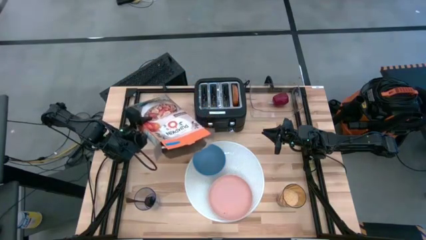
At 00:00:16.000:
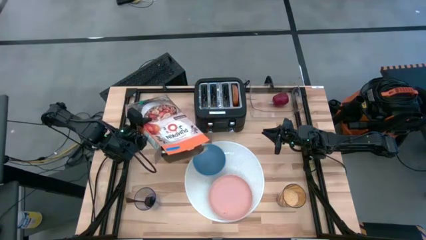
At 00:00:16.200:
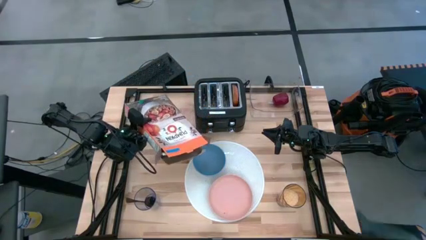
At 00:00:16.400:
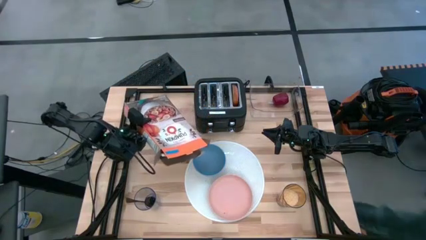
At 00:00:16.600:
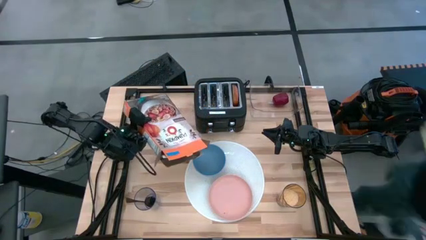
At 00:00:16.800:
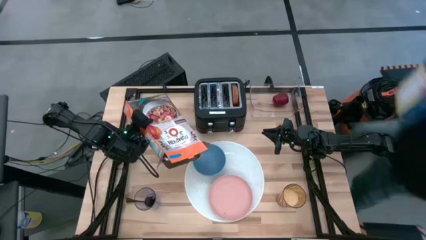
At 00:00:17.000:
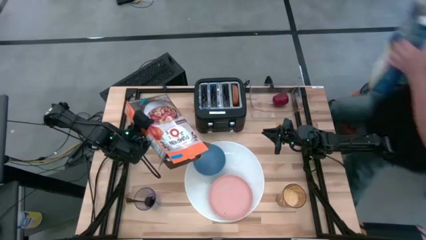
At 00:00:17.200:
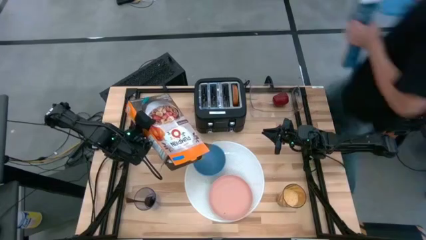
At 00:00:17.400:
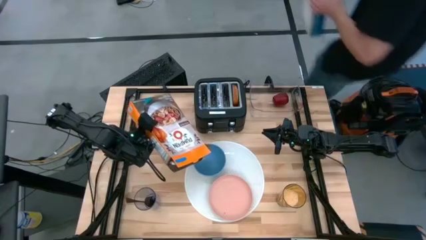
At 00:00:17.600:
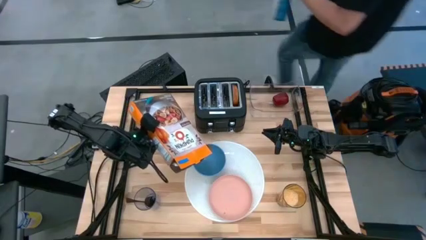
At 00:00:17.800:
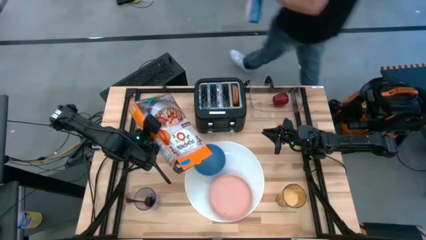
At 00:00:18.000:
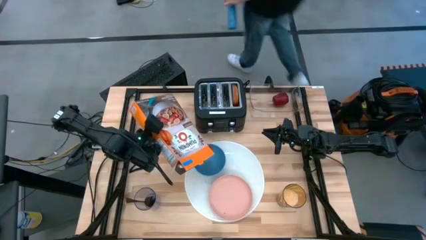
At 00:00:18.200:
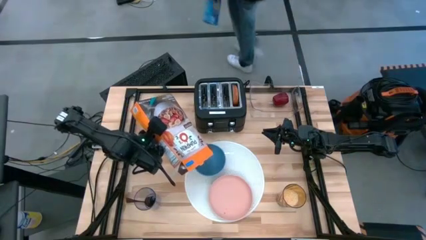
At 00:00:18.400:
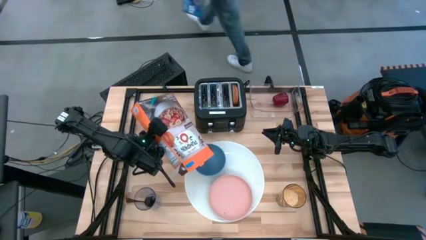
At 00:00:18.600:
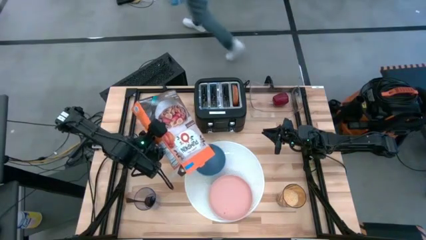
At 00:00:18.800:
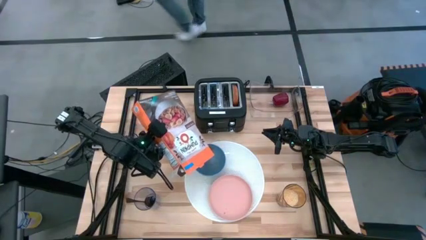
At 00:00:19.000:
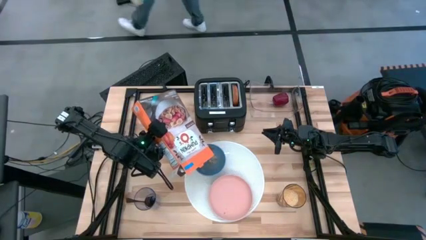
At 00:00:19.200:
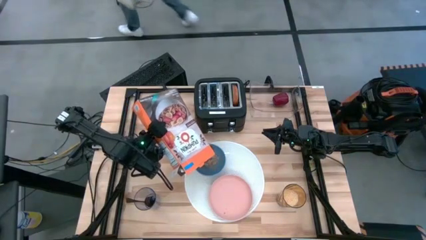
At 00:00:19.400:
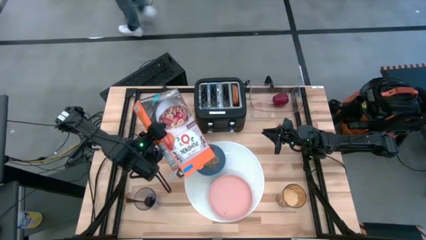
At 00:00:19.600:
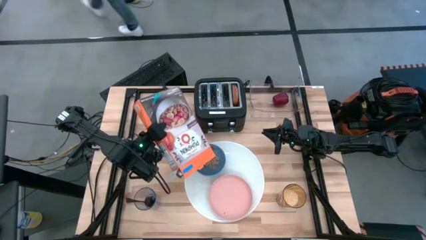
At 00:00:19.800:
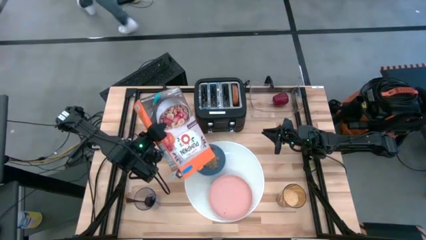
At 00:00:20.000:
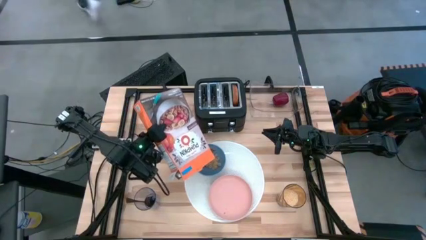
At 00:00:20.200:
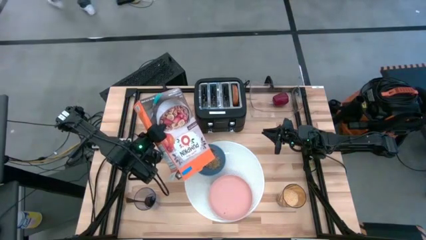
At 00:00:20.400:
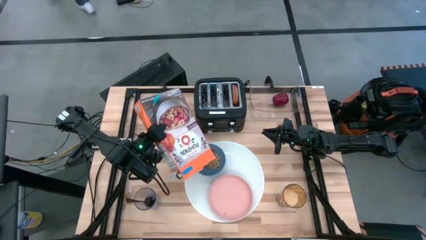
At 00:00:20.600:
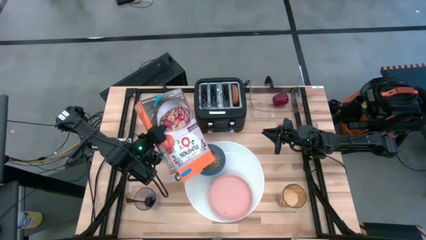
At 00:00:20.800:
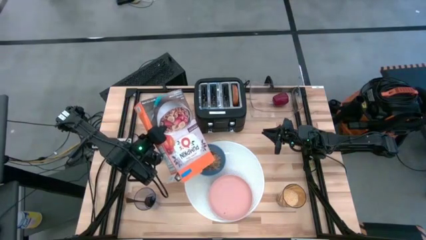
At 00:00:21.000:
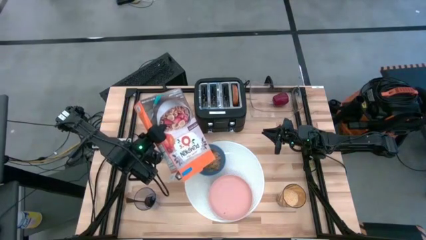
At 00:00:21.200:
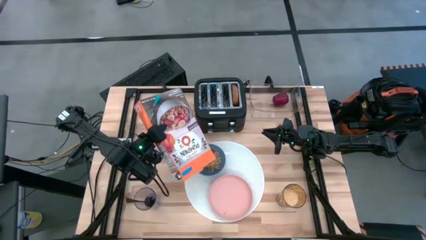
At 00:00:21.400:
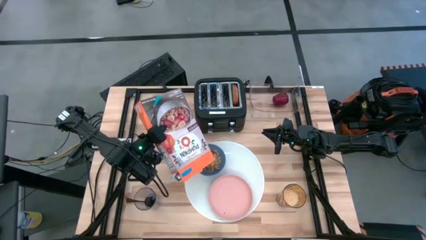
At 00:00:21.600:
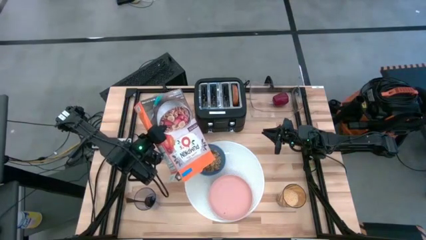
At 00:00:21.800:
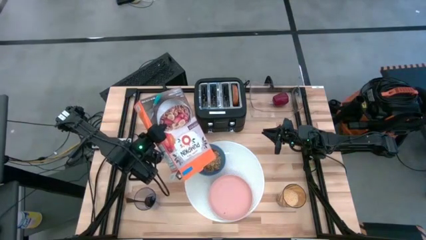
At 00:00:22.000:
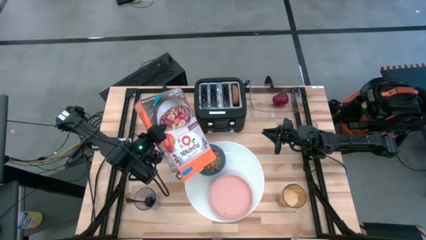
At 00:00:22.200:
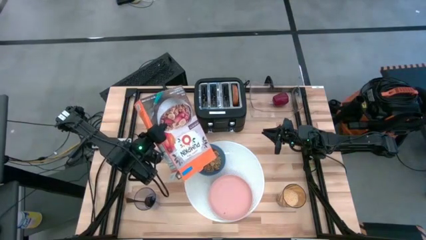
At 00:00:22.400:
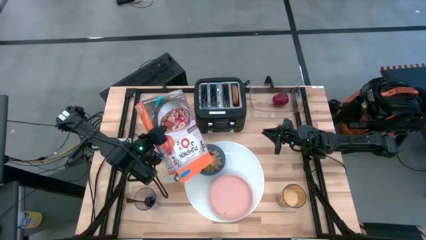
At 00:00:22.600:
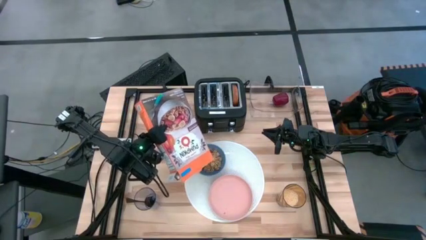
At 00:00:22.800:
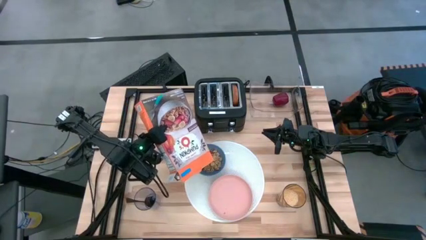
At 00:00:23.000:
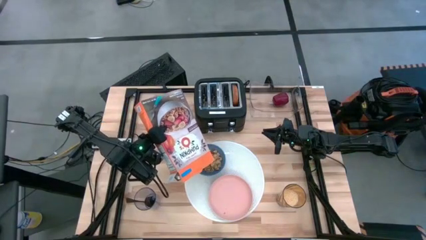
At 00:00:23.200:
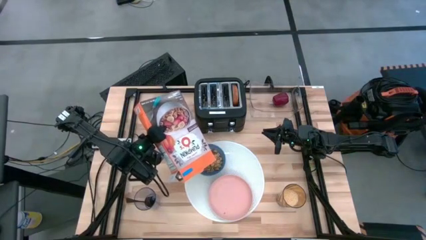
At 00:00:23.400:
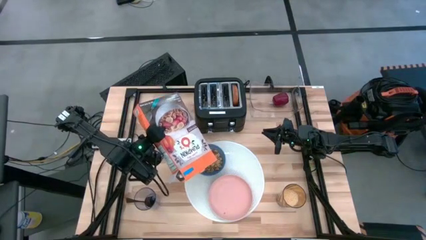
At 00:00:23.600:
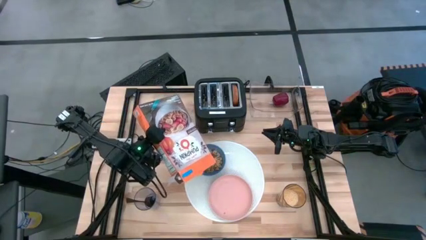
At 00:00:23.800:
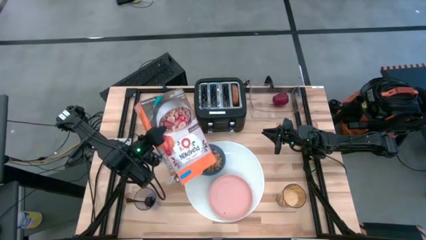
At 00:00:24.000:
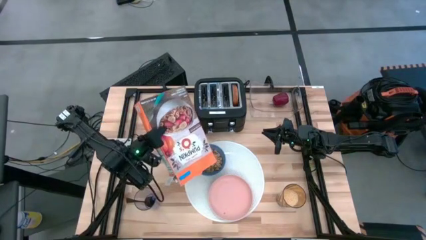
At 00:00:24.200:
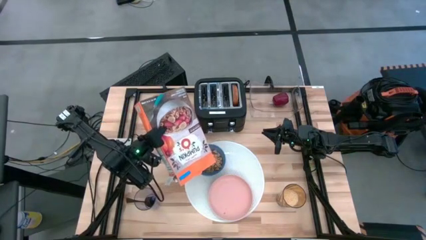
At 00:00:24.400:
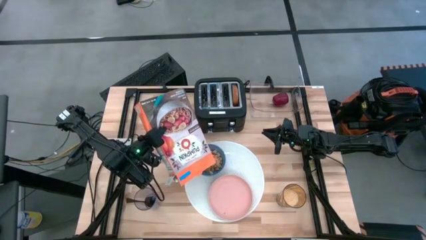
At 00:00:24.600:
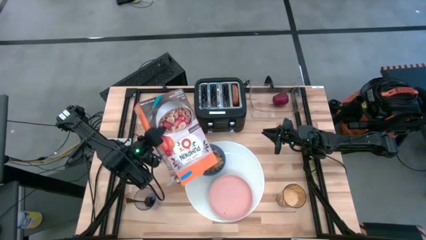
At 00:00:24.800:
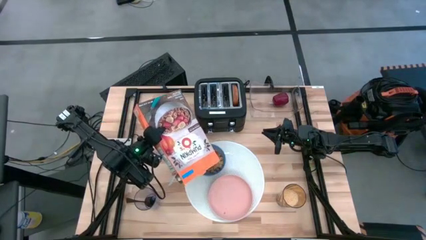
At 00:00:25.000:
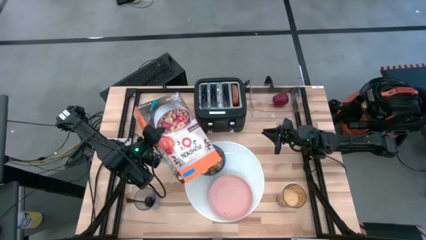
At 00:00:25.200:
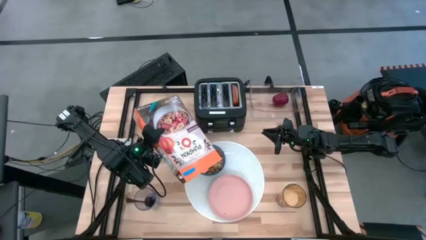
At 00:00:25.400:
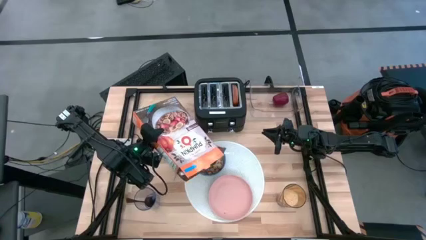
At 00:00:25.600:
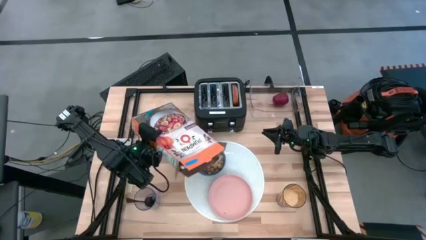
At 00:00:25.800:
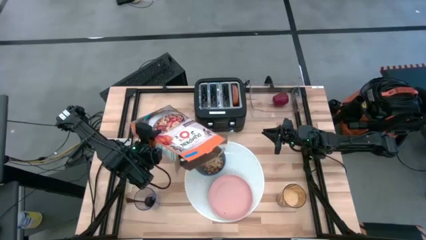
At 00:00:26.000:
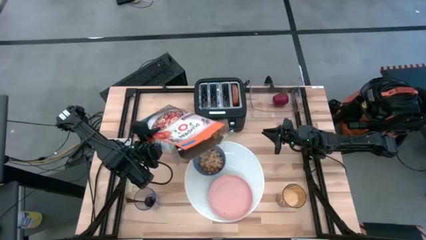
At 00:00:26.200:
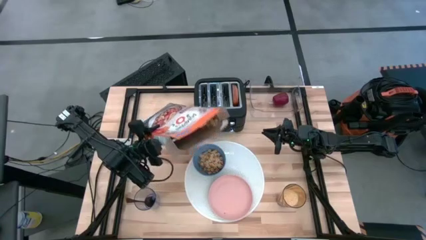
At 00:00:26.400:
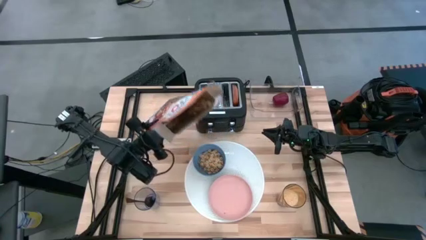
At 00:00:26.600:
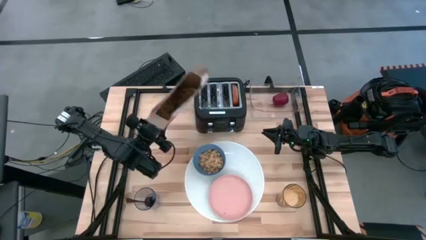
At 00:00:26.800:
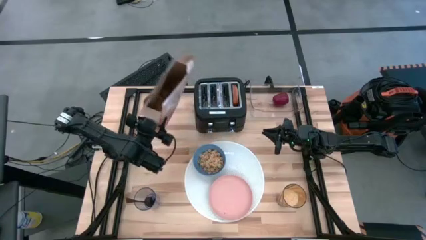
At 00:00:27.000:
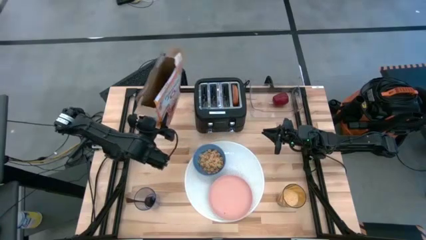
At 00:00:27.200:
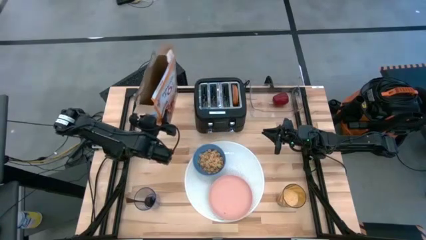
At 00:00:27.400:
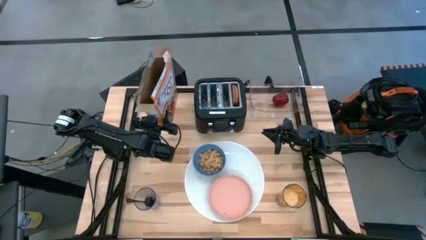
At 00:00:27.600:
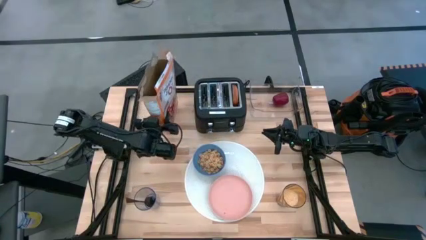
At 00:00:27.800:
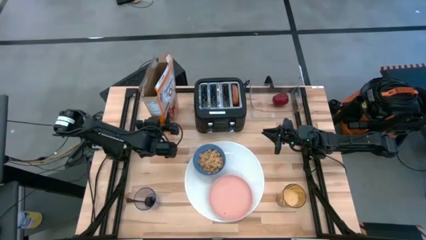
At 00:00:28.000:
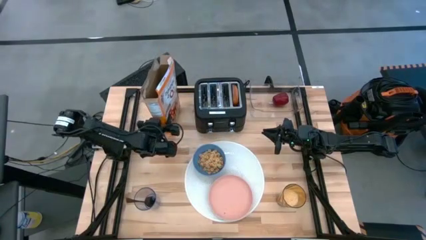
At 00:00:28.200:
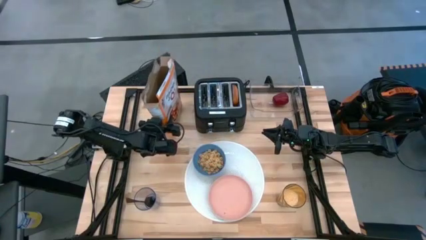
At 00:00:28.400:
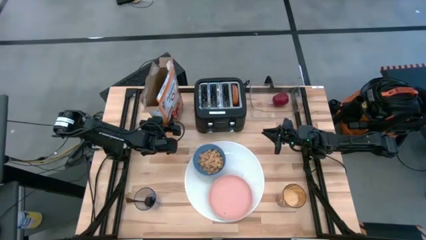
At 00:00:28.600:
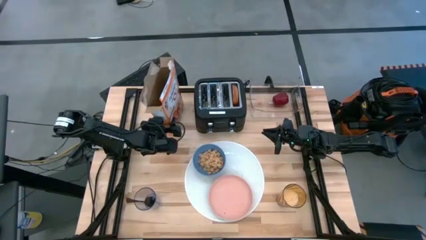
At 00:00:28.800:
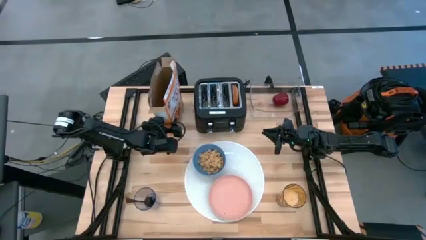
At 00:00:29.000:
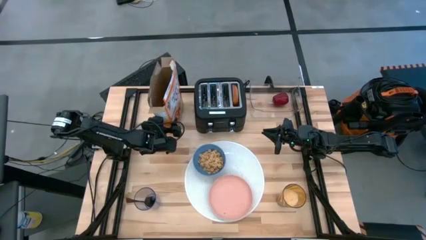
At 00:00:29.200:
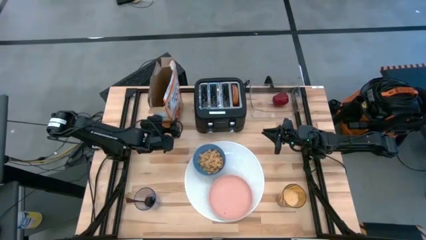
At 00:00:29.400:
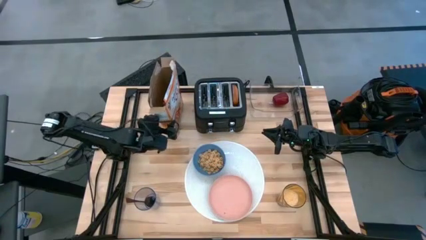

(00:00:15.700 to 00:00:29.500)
Task: Arrange a breakfast setting
Pour the cereal into the blue bowl
